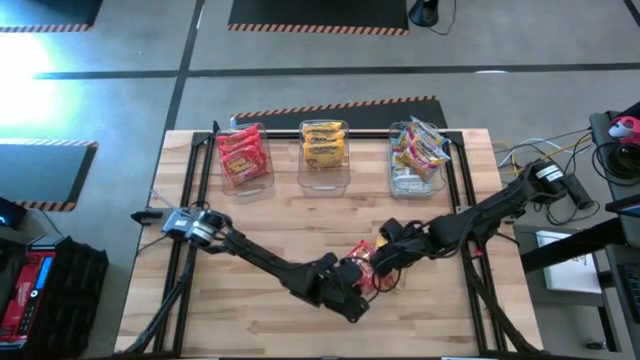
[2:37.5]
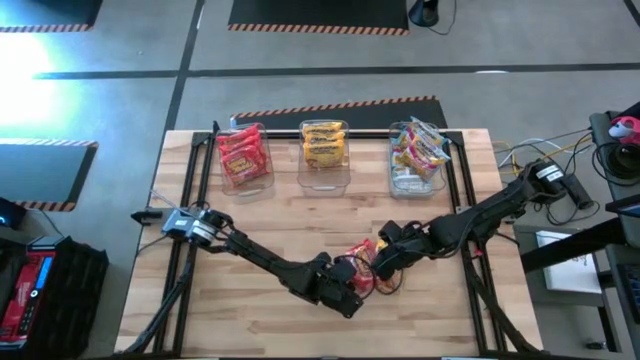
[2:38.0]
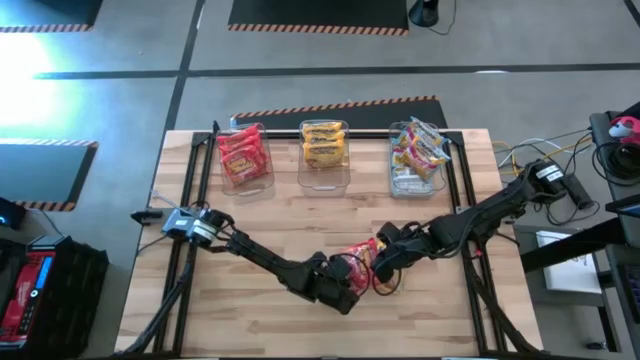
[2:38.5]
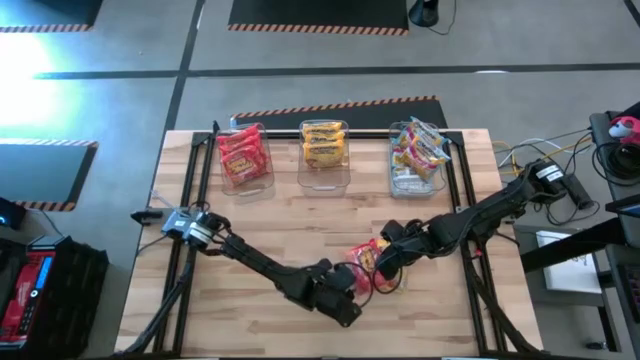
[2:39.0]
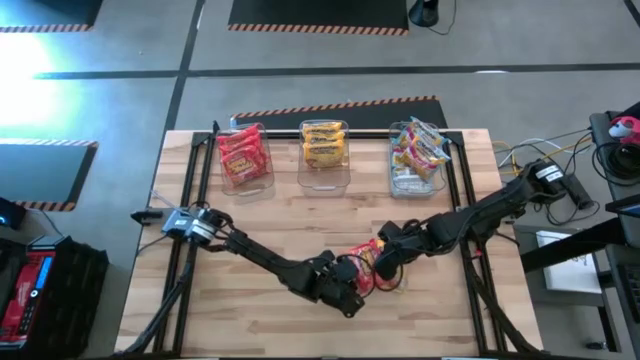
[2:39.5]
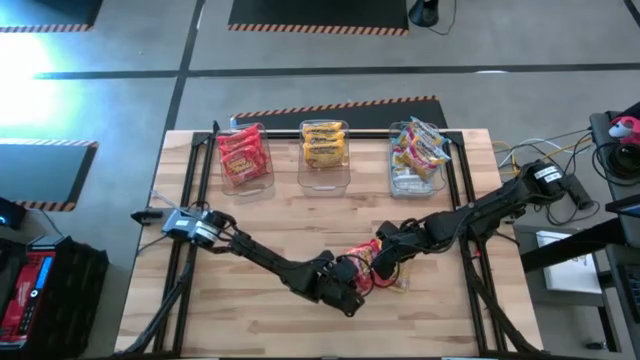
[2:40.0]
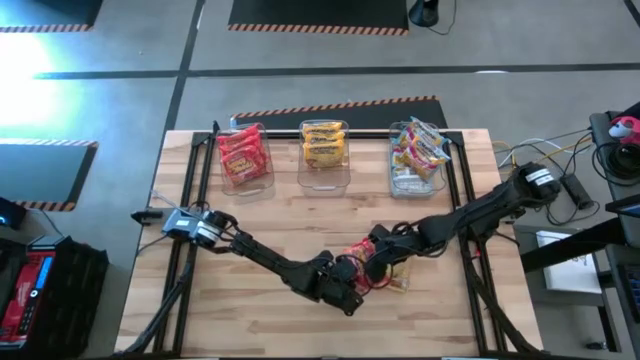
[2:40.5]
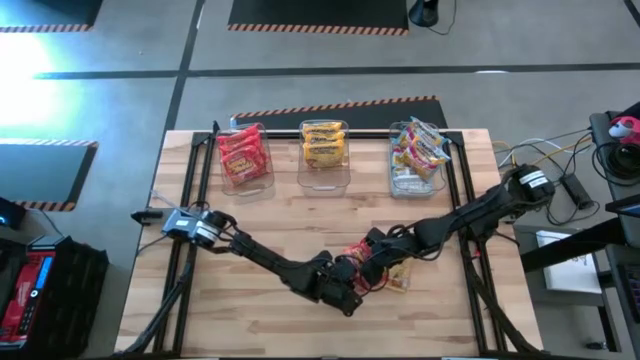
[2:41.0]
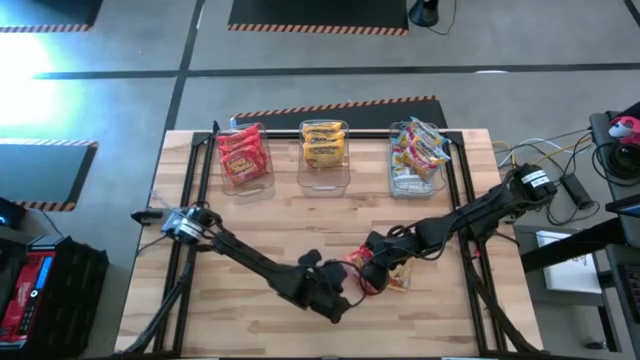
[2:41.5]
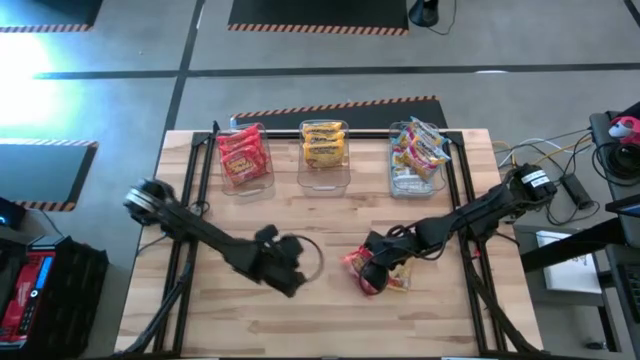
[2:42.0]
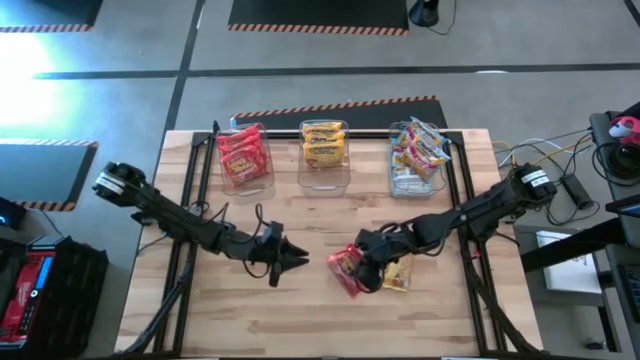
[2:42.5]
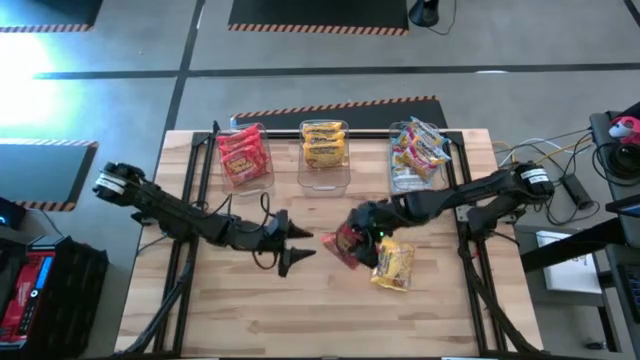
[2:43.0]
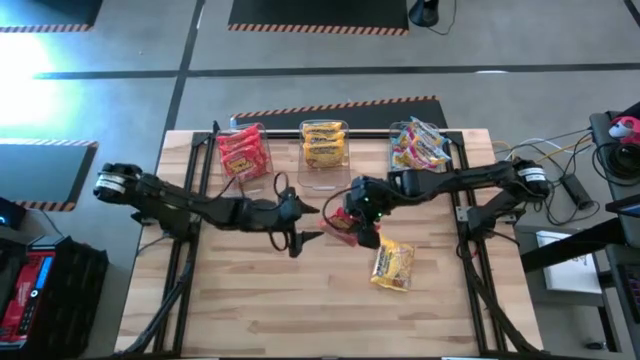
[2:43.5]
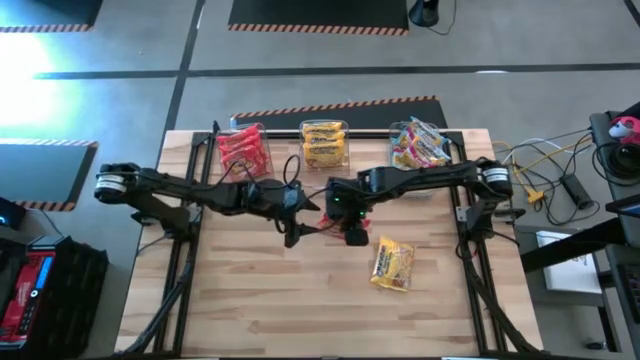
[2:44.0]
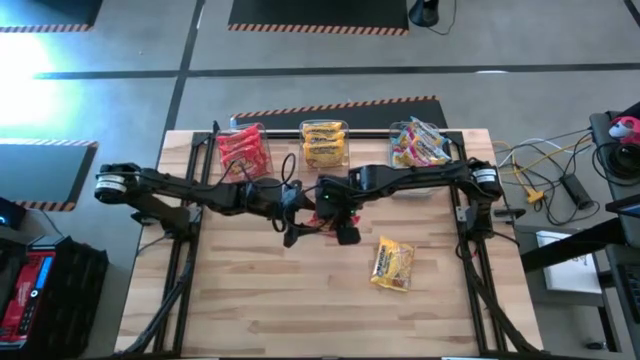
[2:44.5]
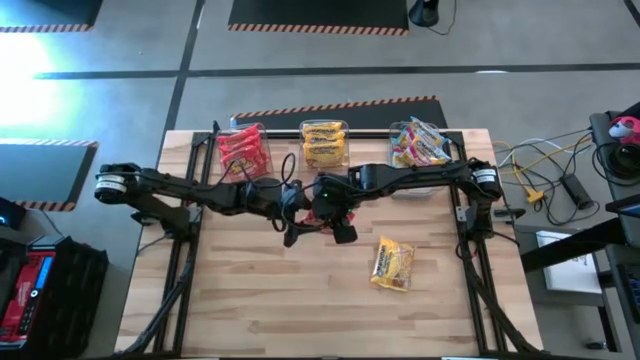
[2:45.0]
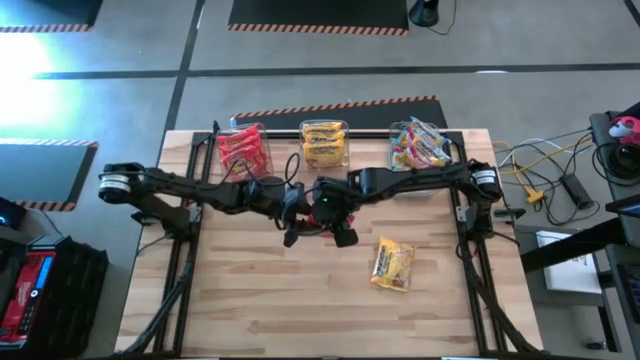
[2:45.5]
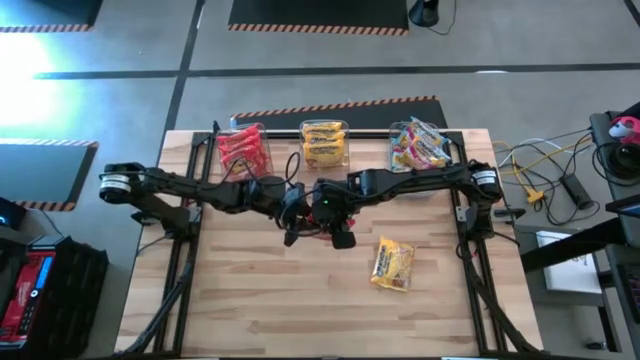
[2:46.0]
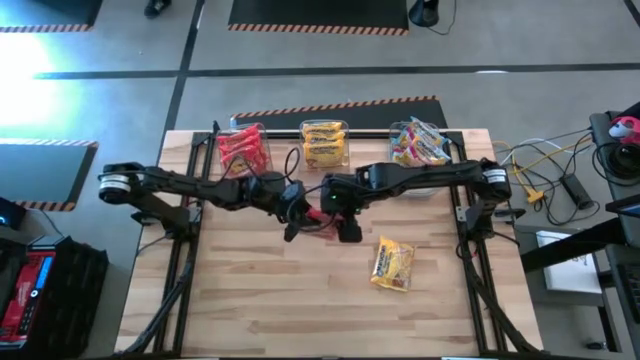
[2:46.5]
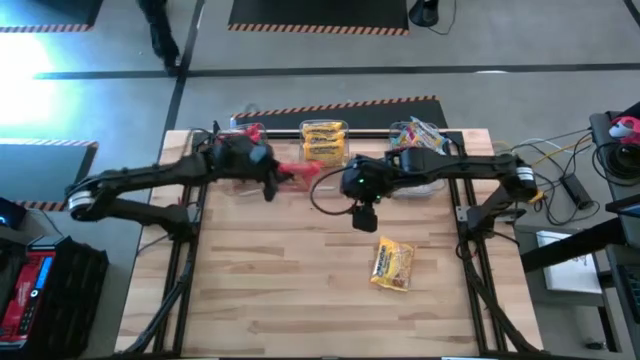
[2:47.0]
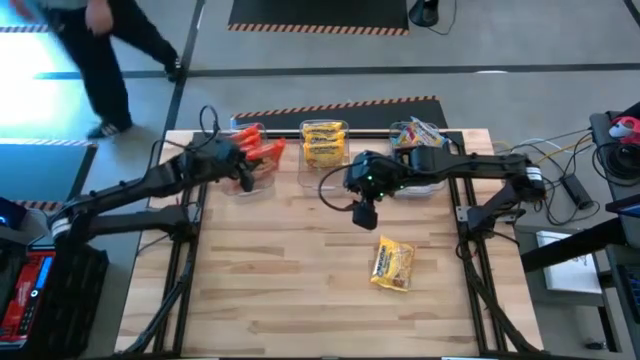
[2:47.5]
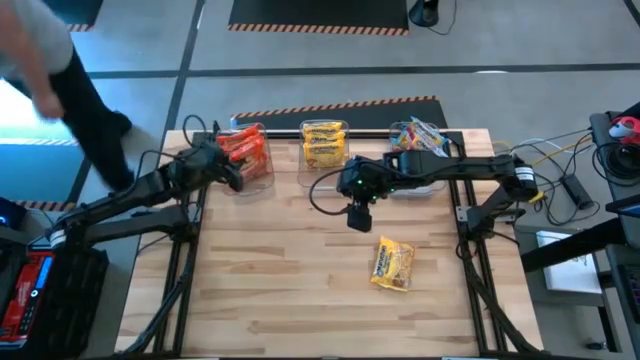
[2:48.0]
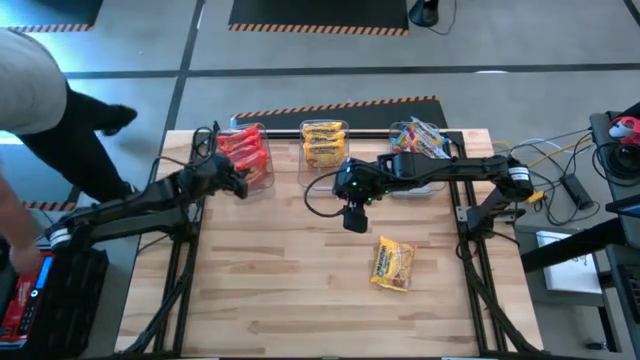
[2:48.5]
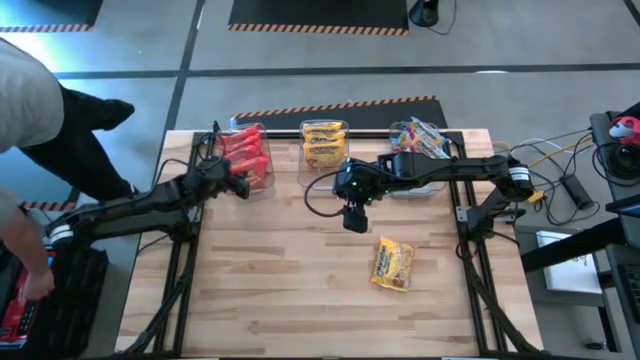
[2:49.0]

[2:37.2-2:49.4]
Task: Sort Maruchan noodles
Put the orange noodle pack into the left transparent bin
